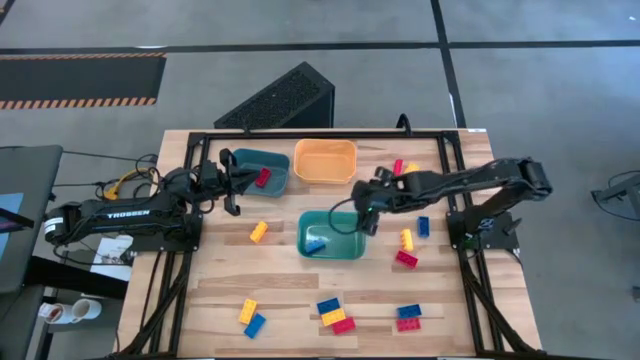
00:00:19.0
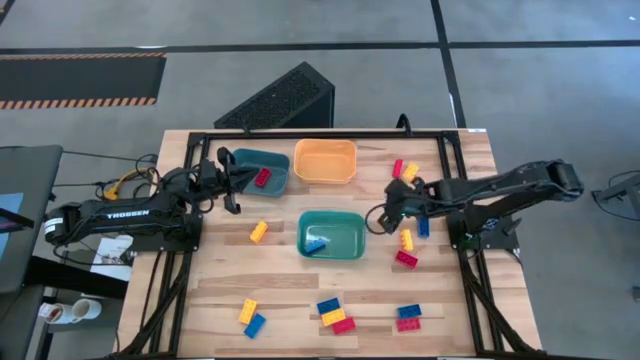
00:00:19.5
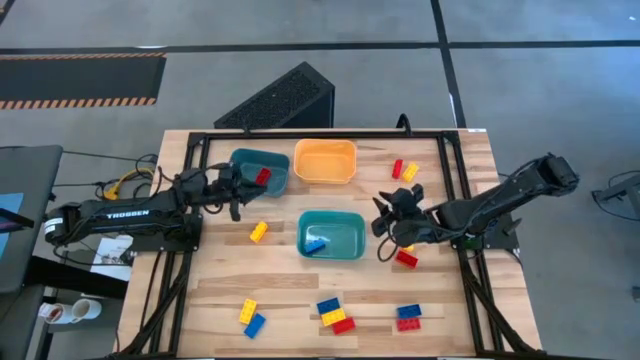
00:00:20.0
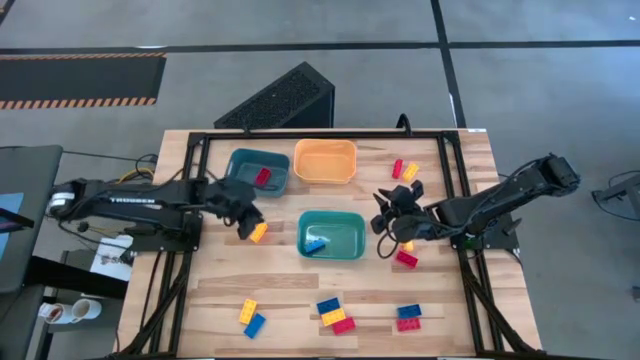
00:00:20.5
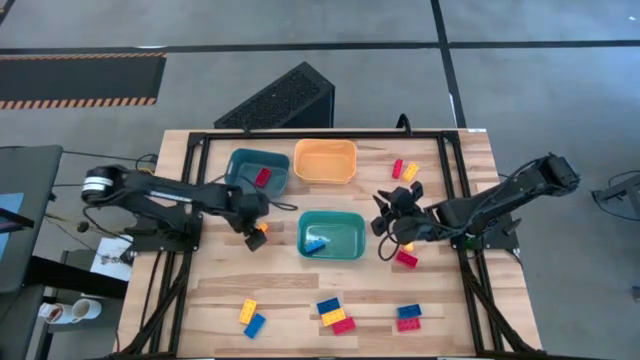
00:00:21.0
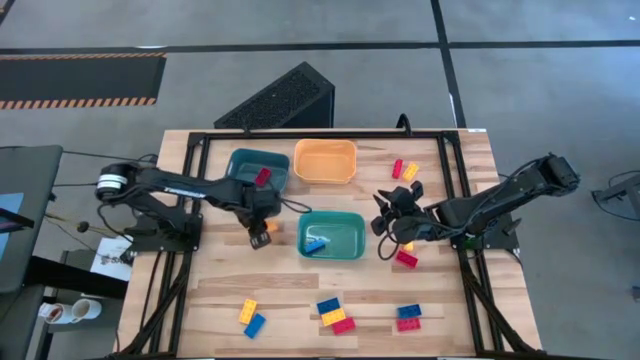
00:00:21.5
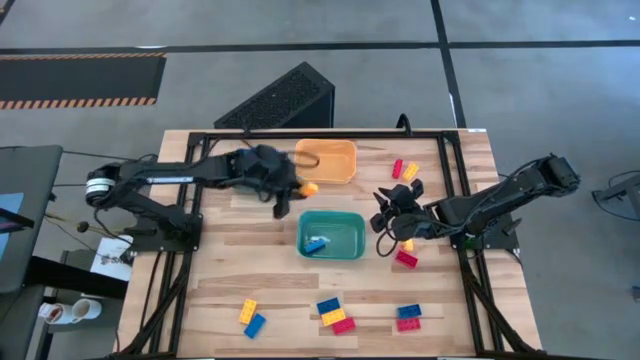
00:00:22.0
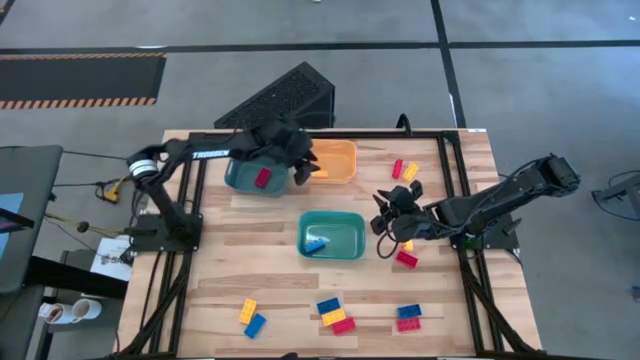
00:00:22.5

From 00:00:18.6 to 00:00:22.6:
Task: Sort & place blocks by color
Put the yellow game piece into the orange bin

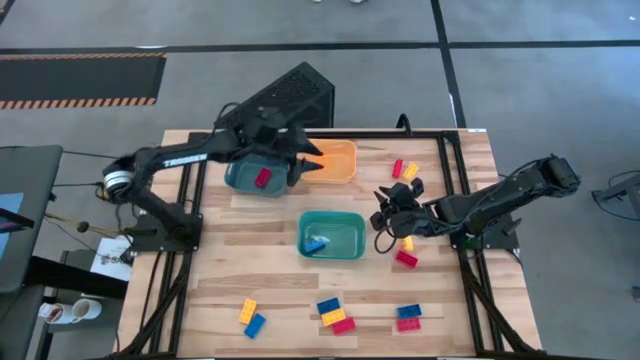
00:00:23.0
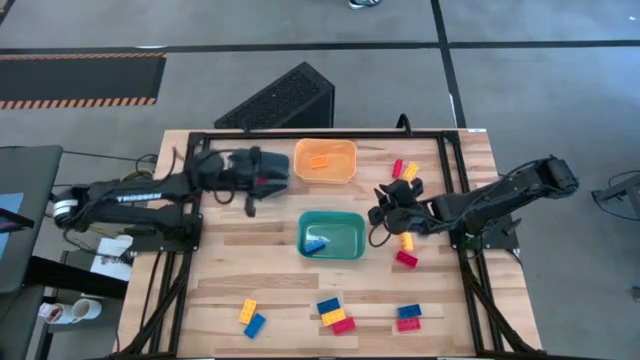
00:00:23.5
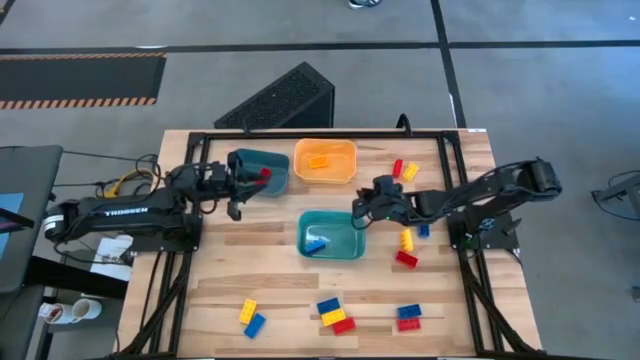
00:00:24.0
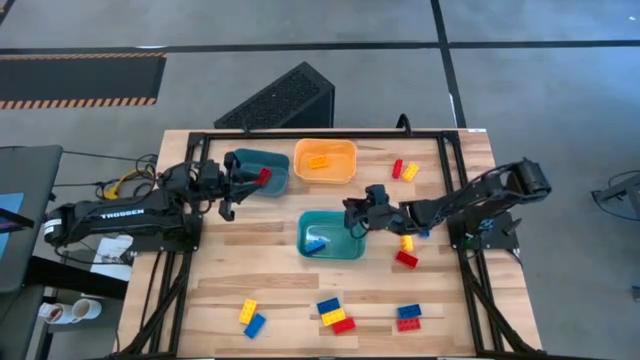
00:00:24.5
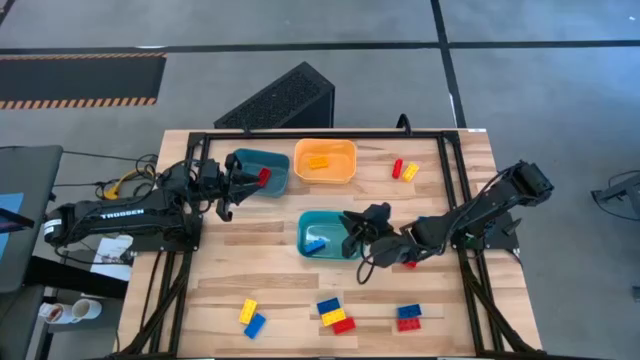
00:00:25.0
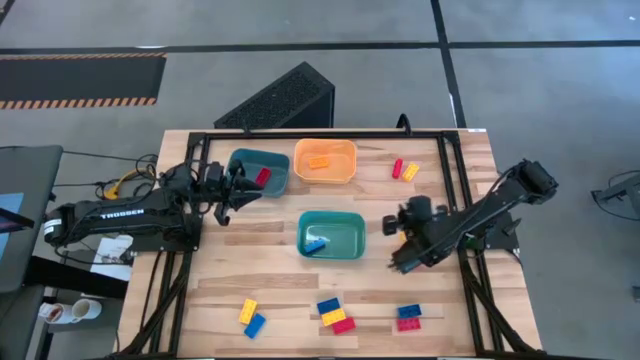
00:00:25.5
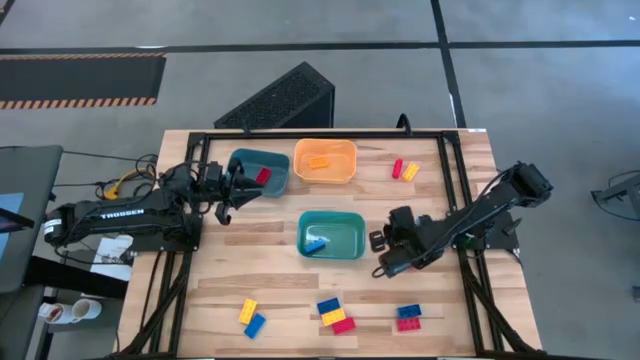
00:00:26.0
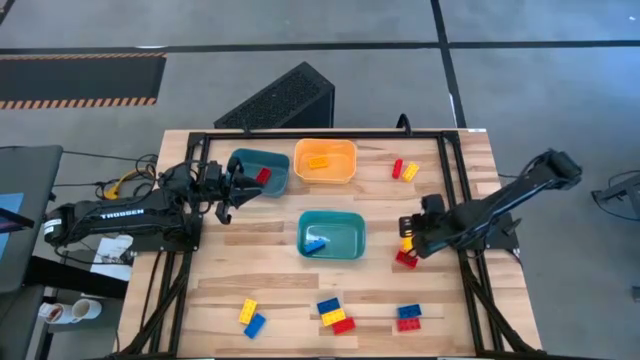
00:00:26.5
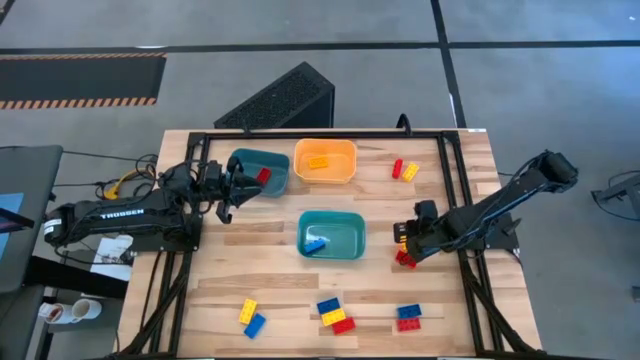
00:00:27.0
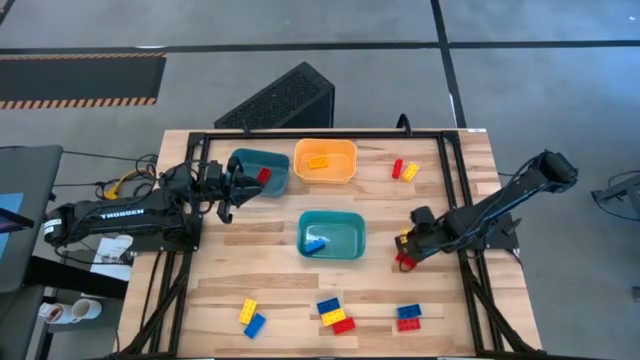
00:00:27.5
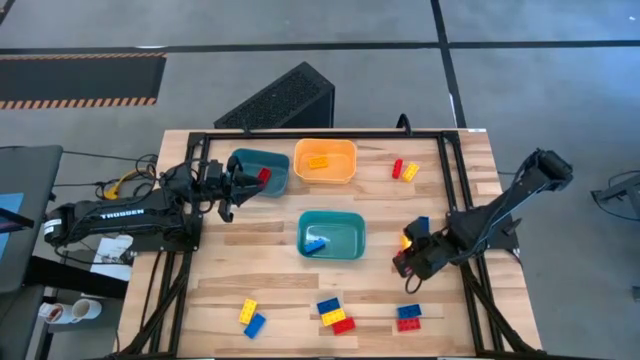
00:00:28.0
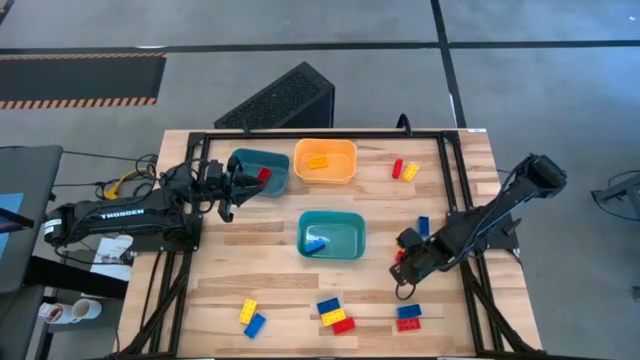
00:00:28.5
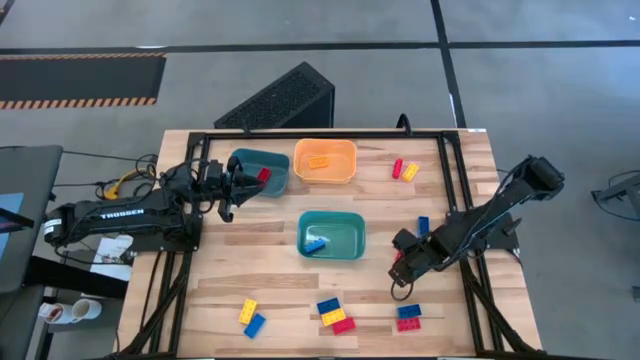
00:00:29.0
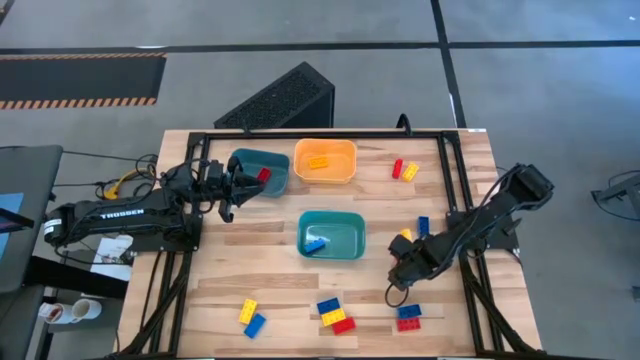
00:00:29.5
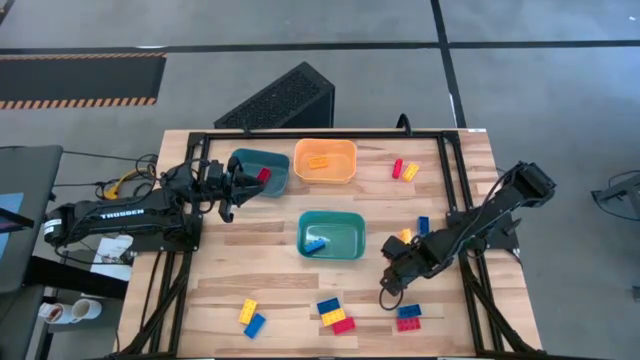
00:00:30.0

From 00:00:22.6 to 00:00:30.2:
Put the red game piece into the blue bin

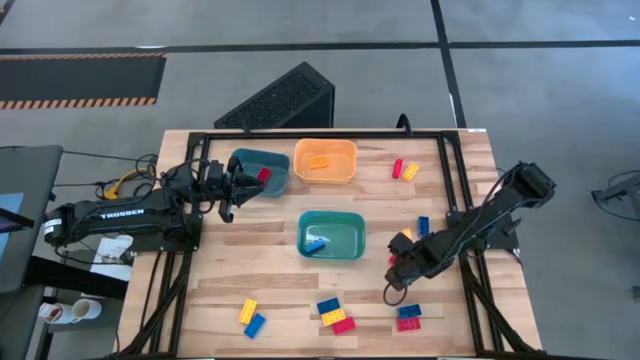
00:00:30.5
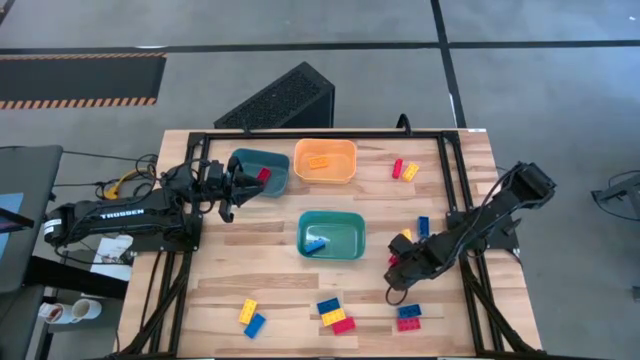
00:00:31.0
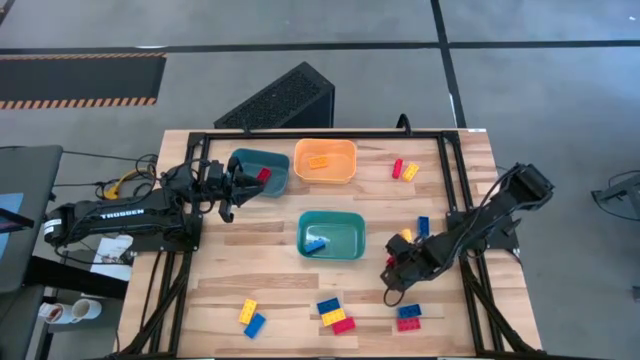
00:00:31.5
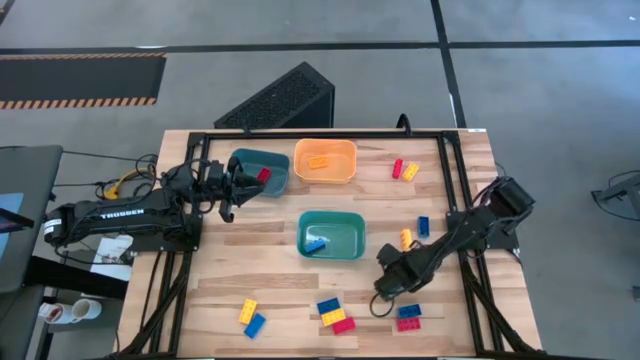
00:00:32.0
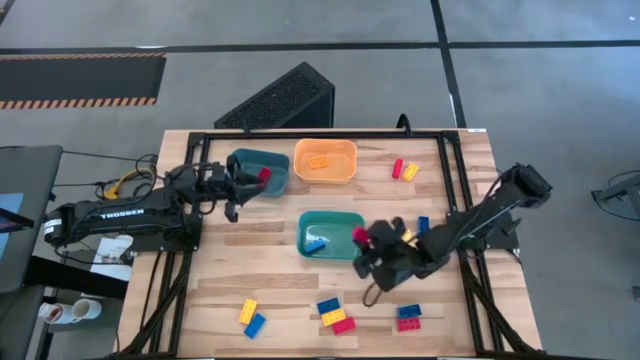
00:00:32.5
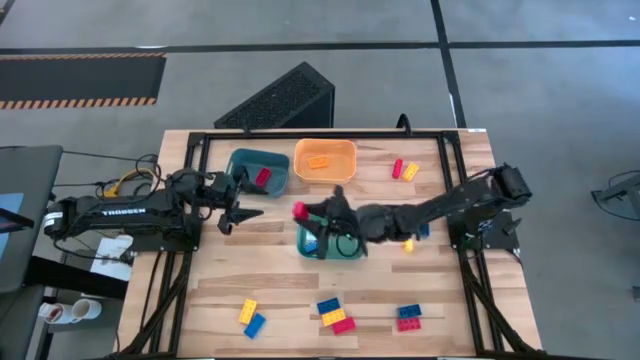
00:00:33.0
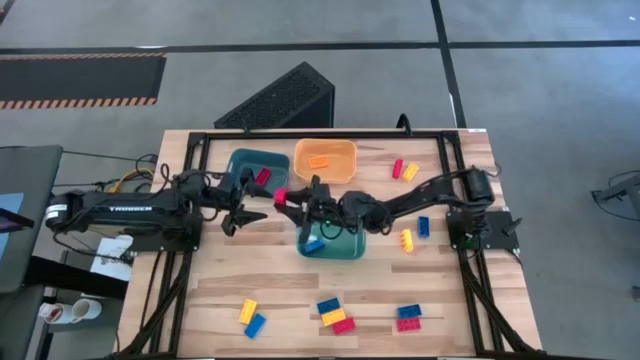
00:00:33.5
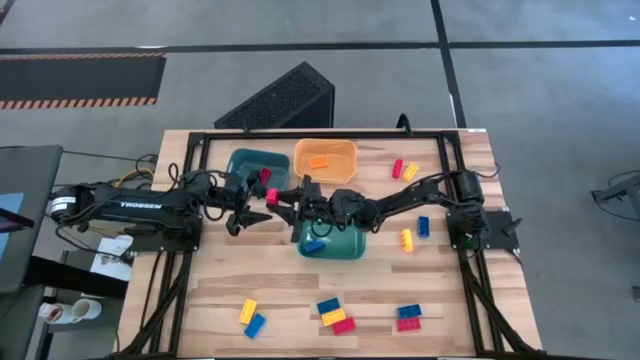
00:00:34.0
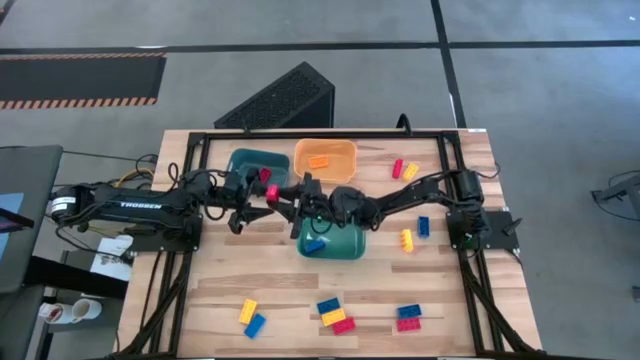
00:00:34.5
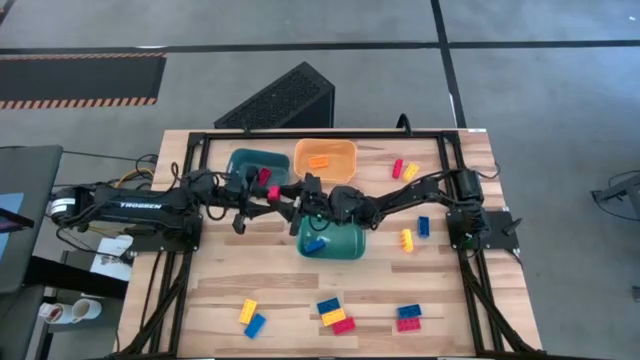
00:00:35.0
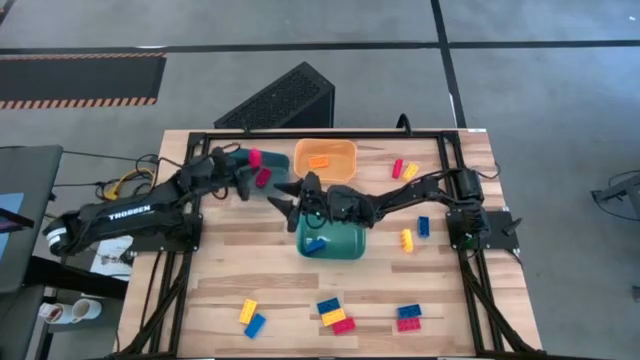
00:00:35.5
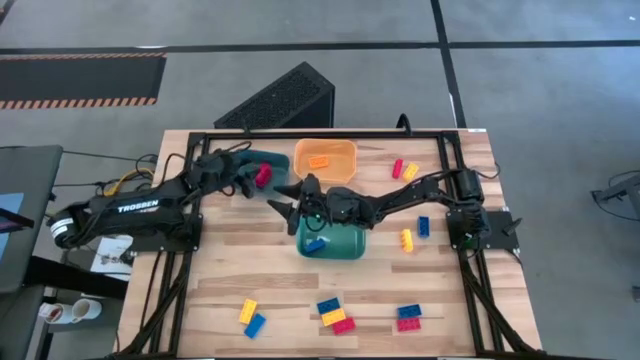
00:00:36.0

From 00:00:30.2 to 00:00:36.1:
Put the red game piece into the blue bin

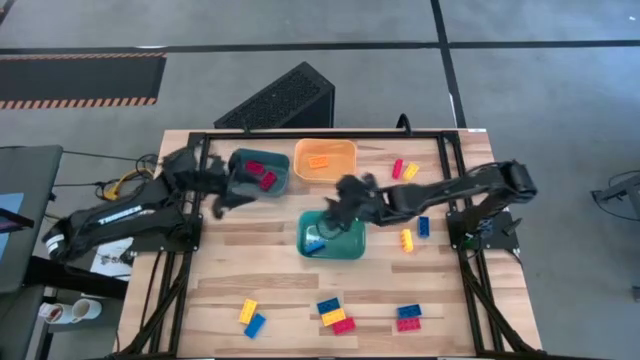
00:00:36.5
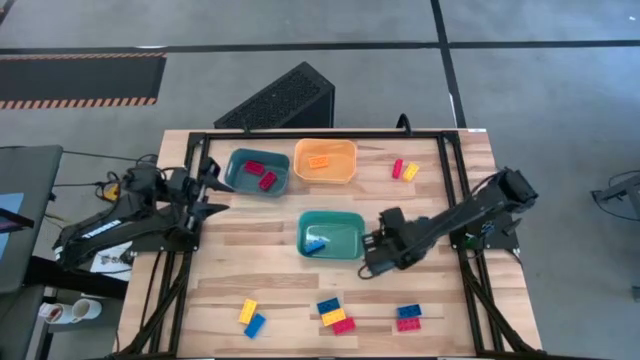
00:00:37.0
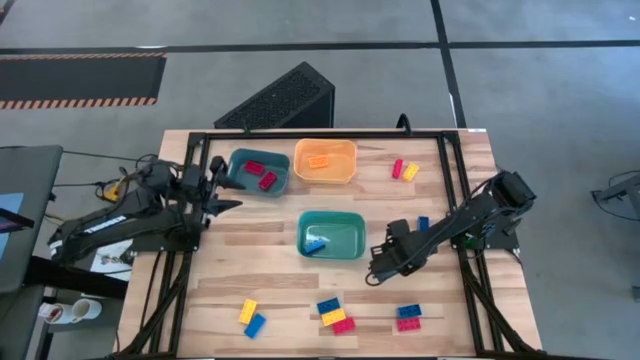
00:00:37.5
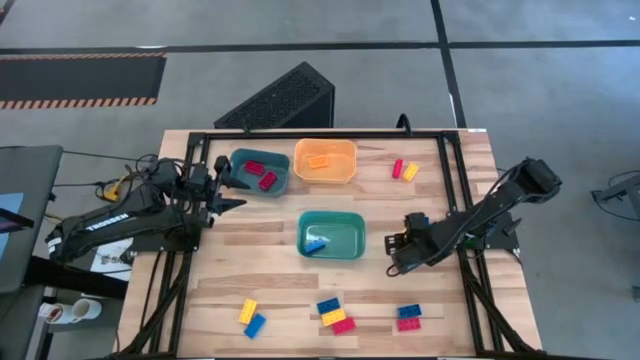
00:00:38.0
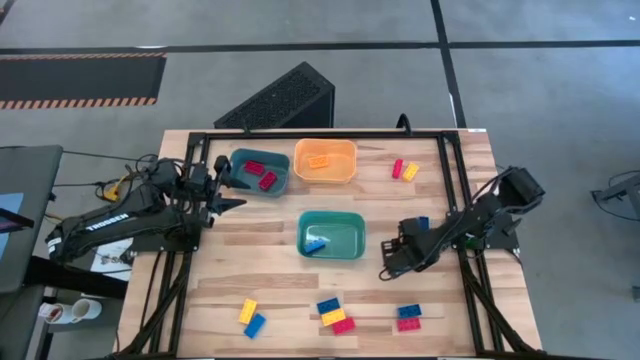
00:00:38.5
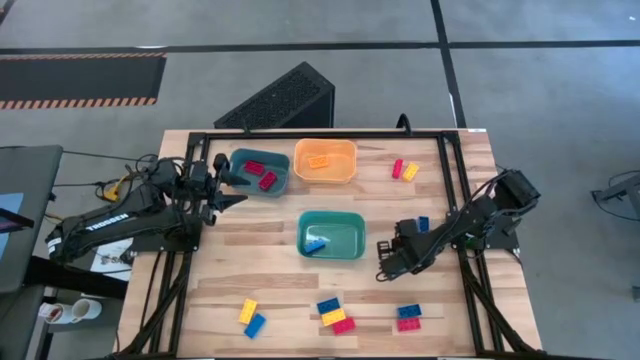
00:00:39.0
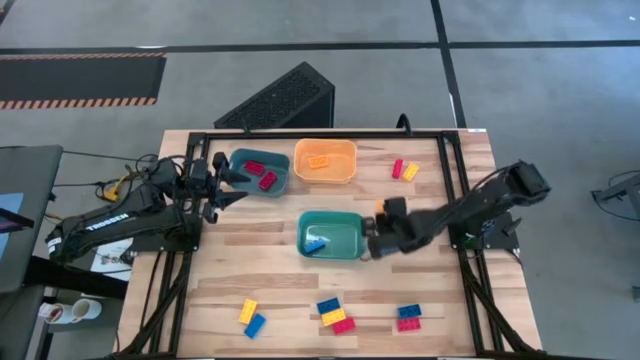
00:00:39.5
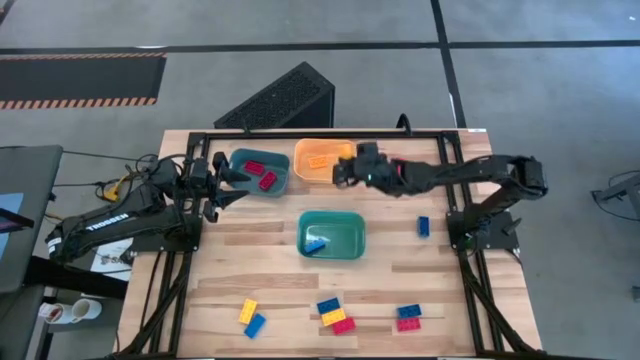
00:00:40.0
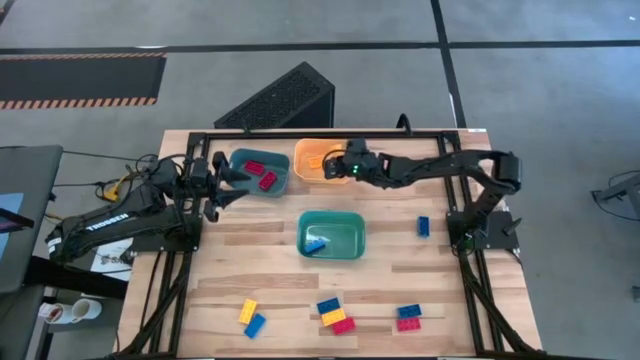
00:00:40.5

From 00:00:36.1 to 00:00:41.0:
Put the yellow game piece into the orange bin
